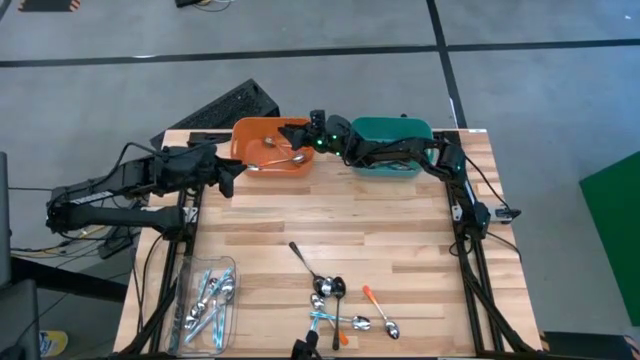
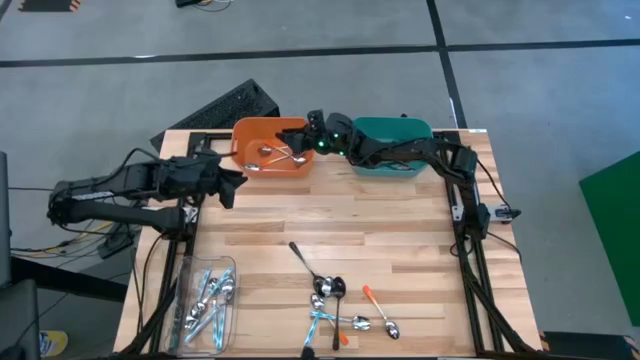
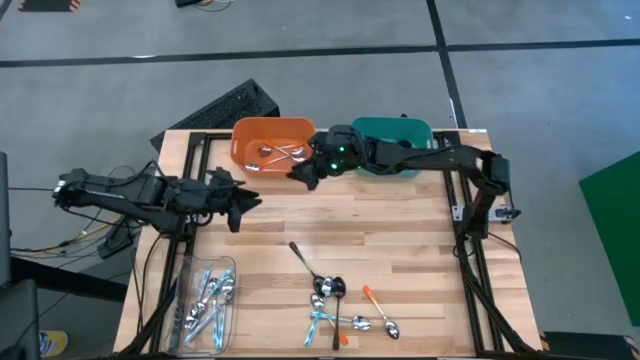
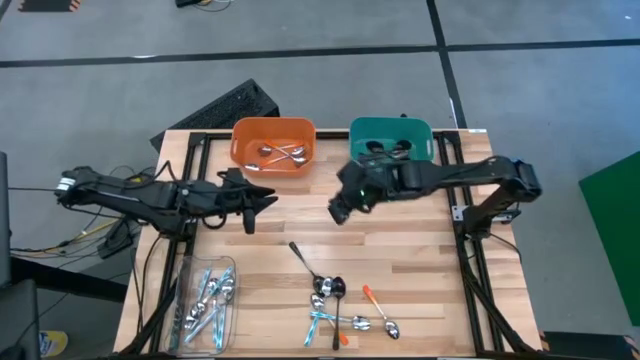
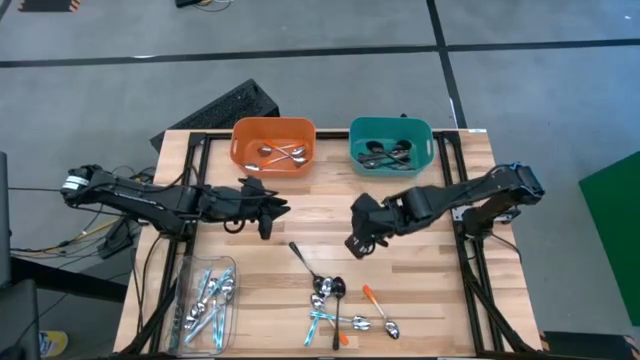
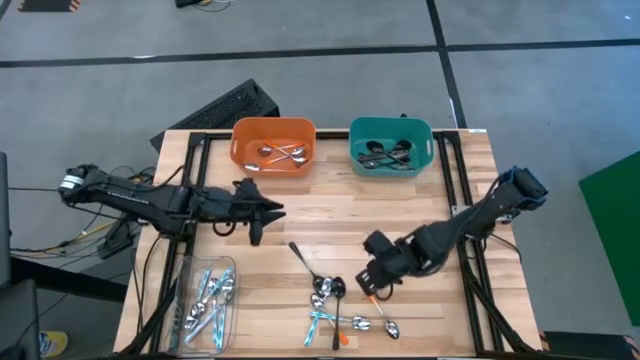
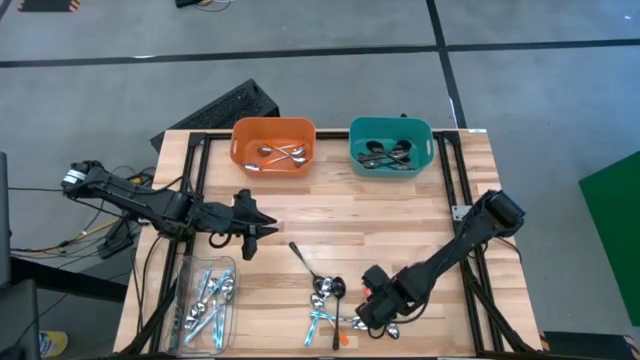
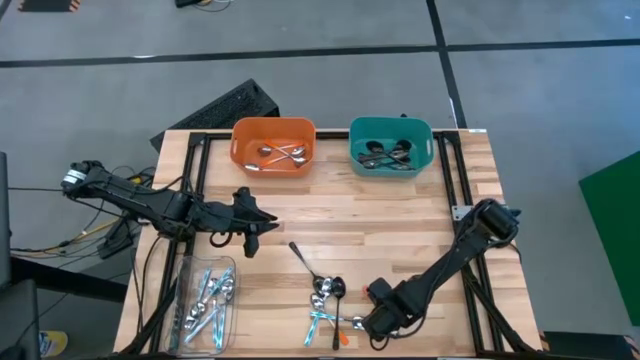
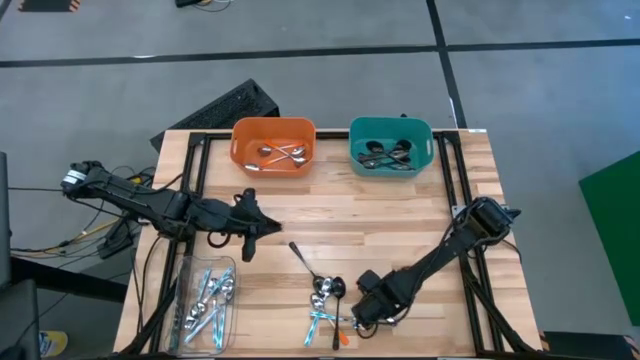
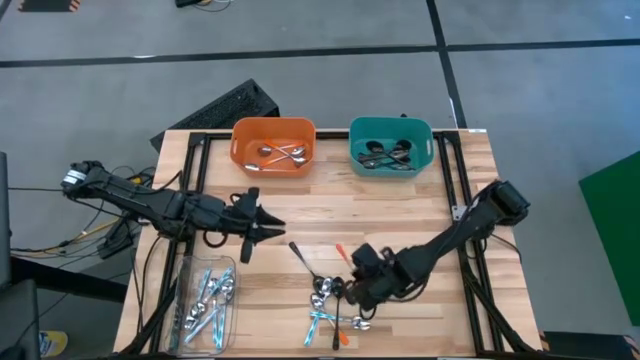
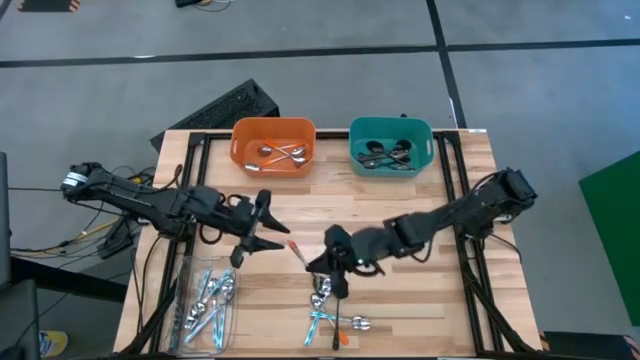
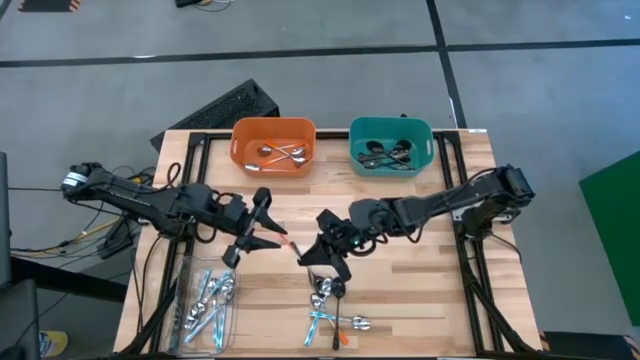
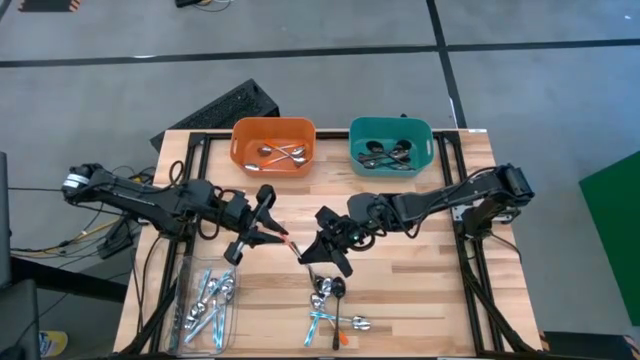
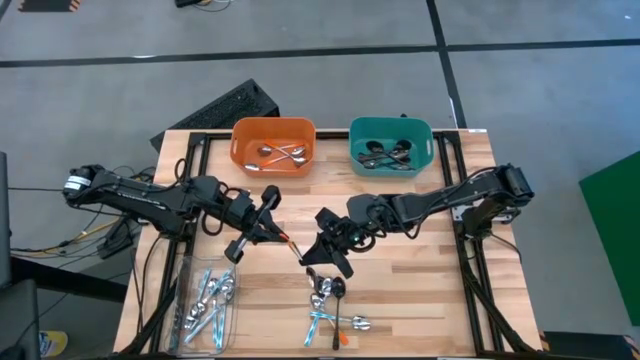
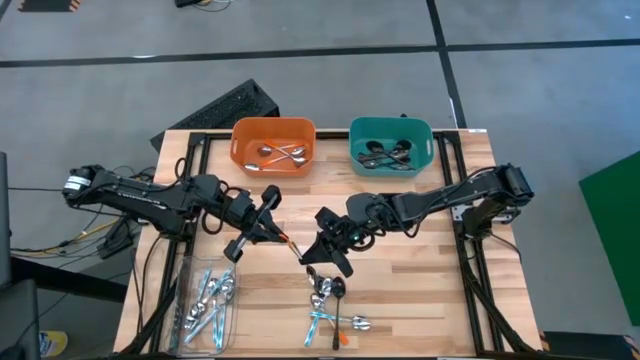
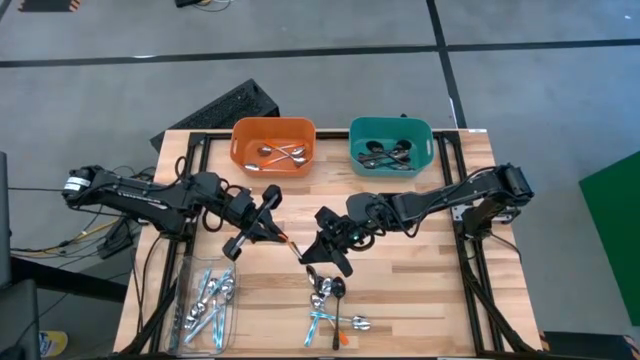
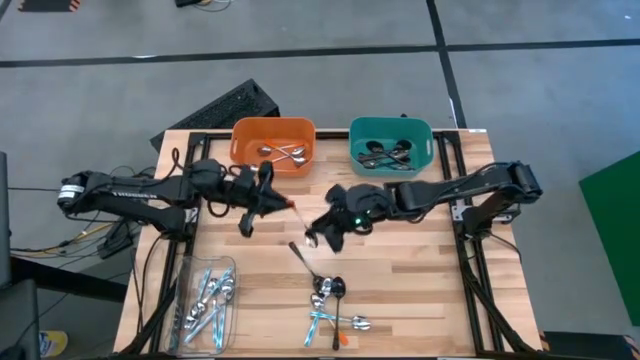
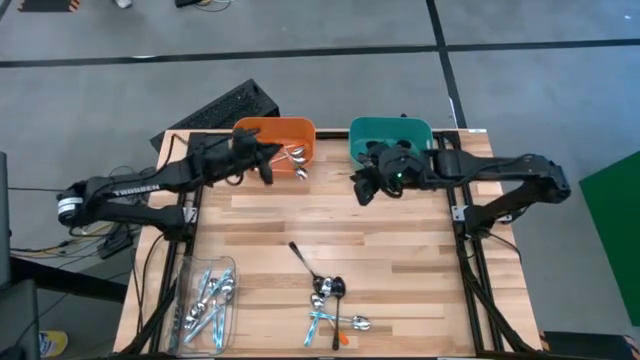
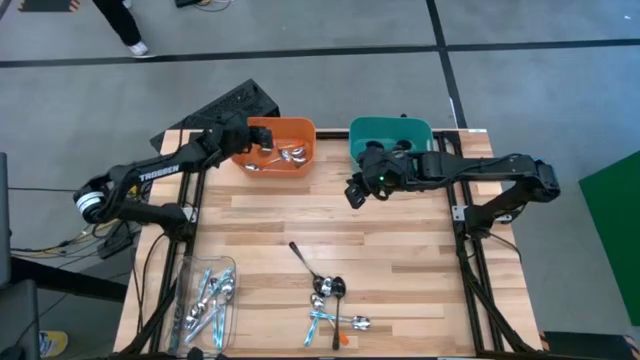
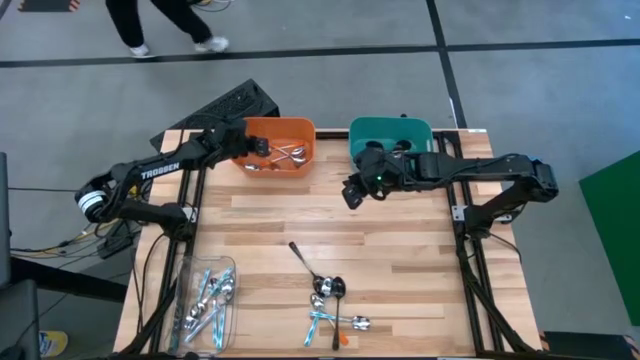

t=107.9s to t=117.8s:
Task: Sort silverware by color (type)
Put the orange spoon into the orange bin

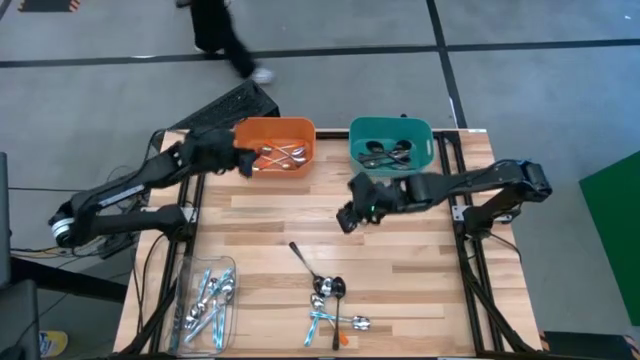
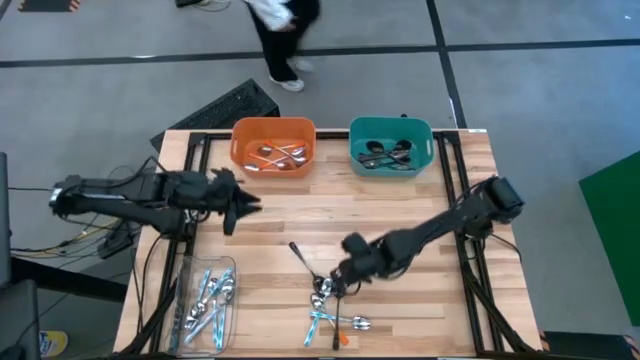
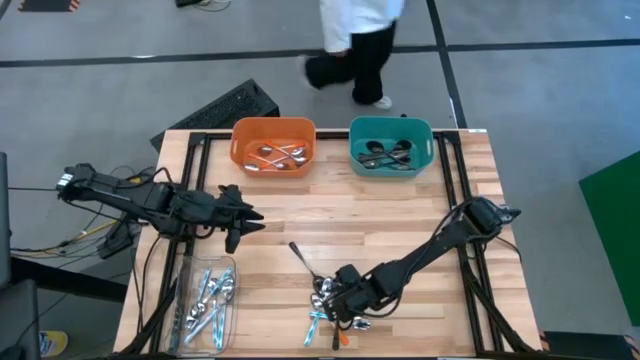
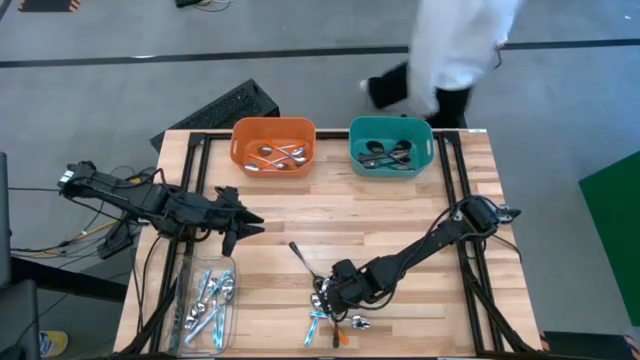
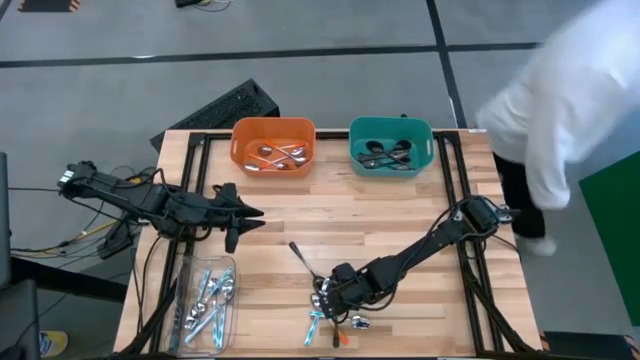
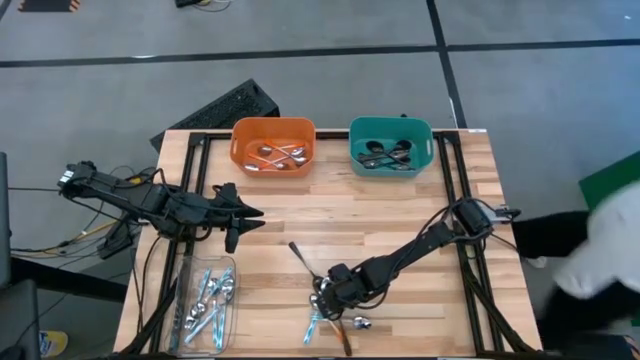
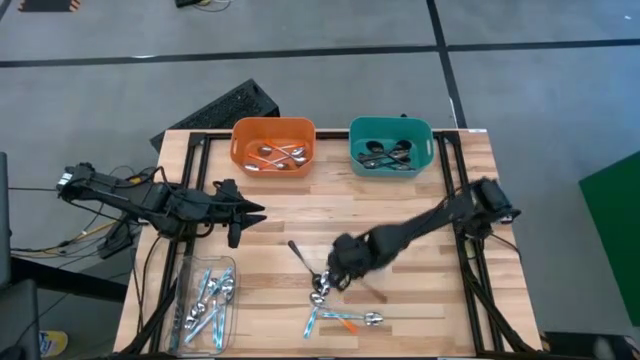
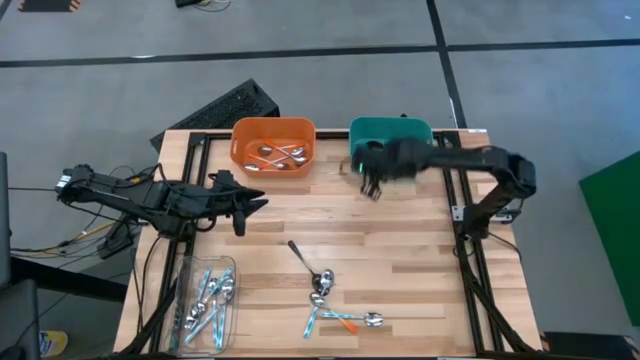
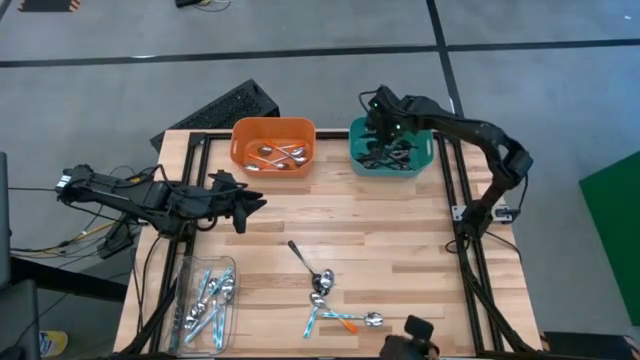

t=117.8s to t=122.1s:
Put the black spoon into the blue bin

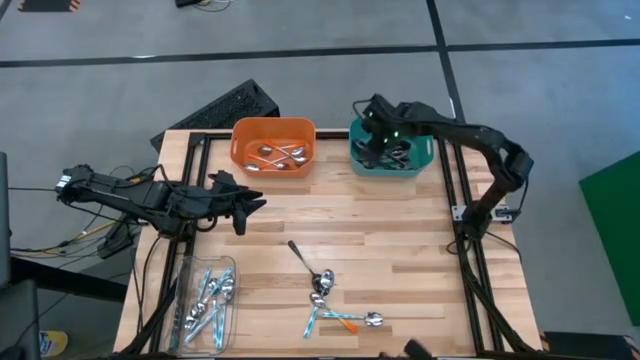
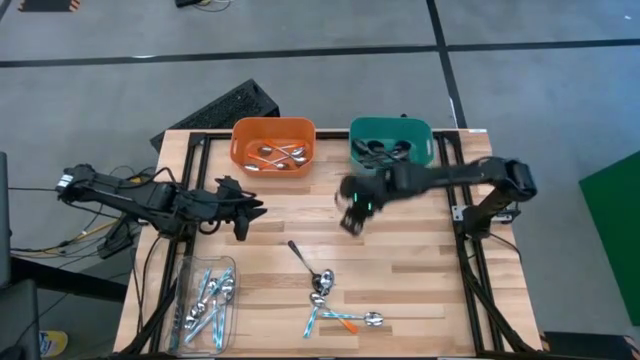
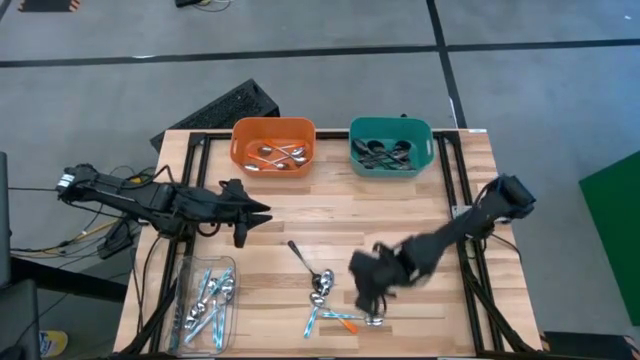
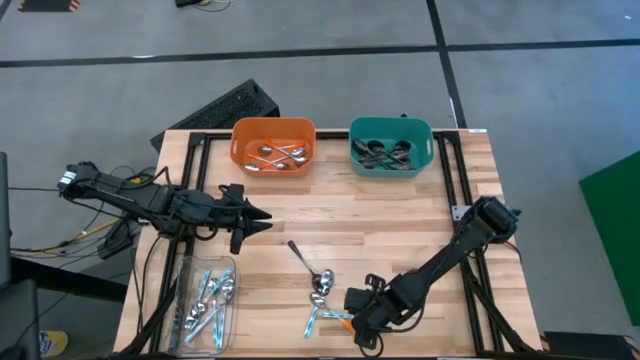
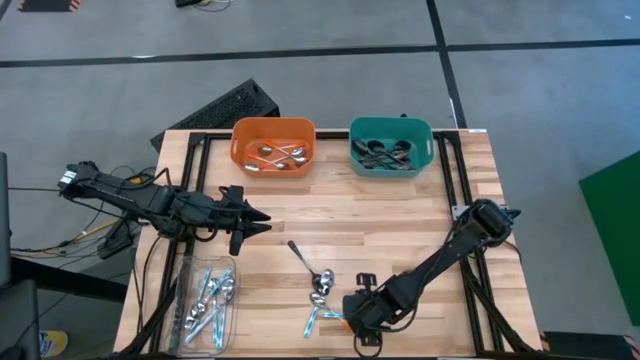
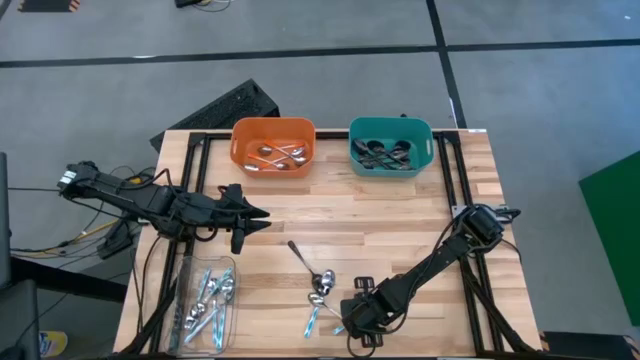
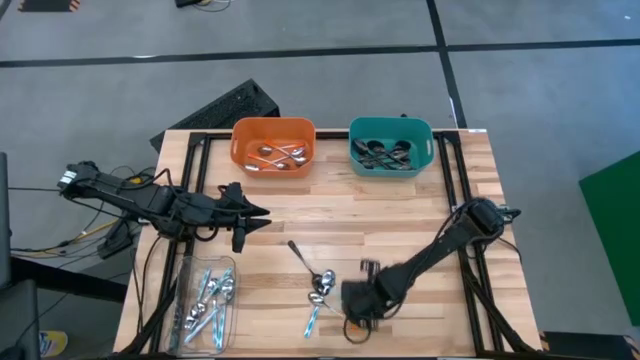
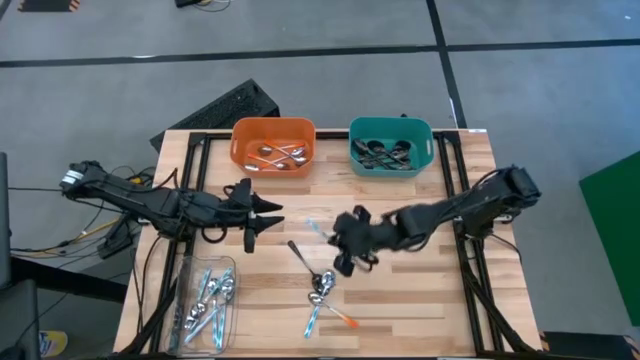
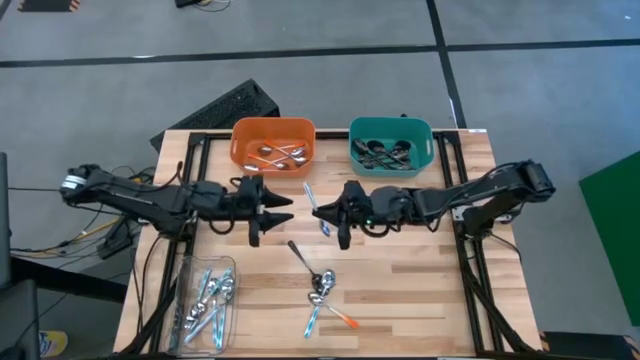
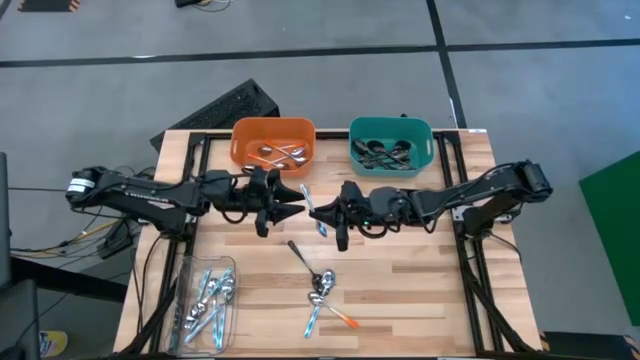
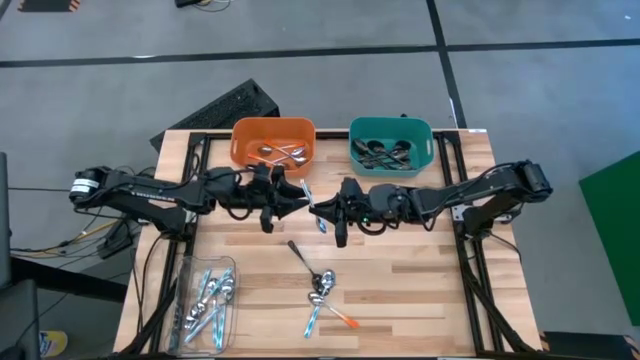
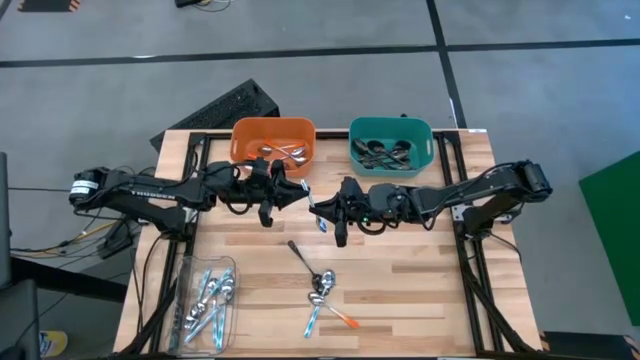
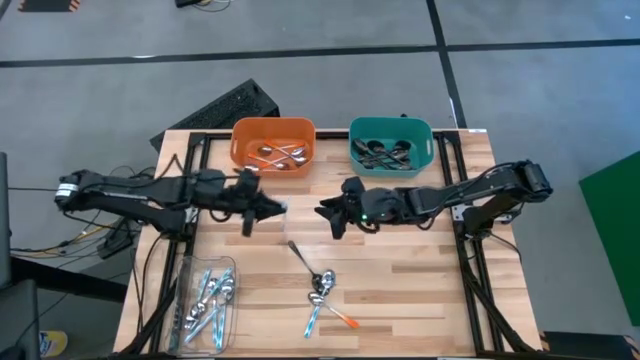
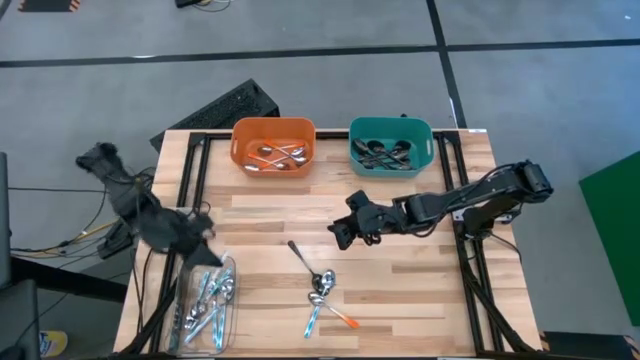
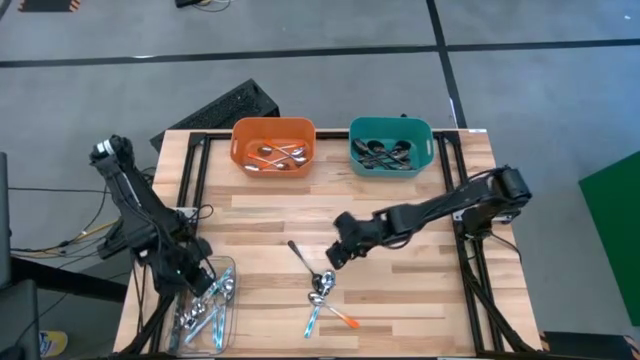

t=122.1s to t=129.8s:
Put the green spoon into the transparent bin
